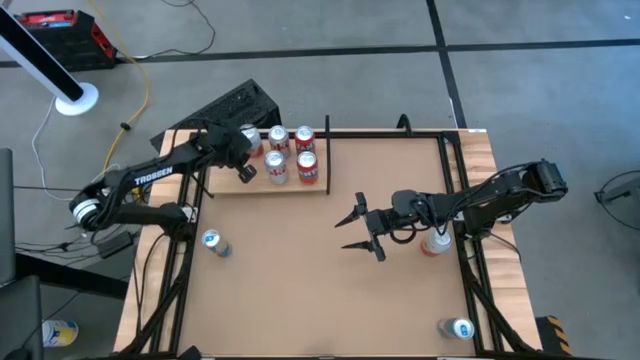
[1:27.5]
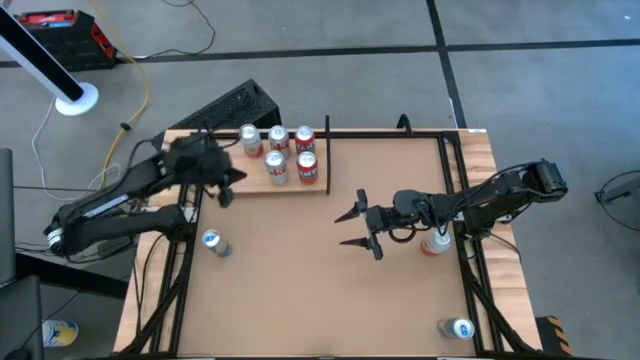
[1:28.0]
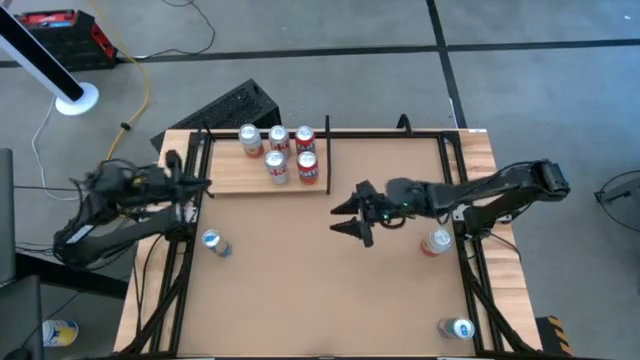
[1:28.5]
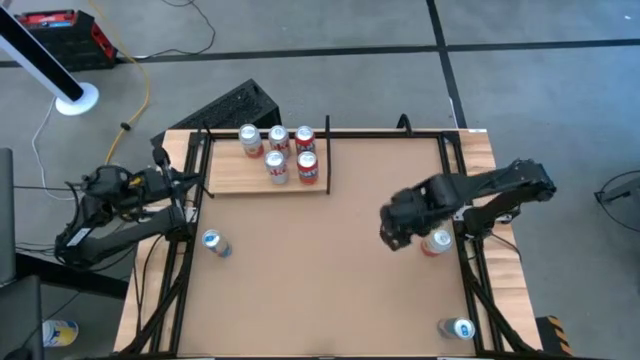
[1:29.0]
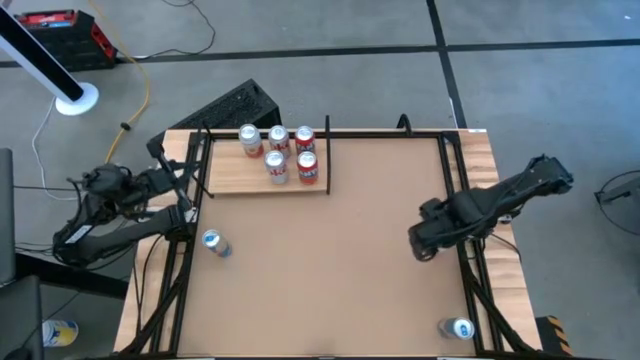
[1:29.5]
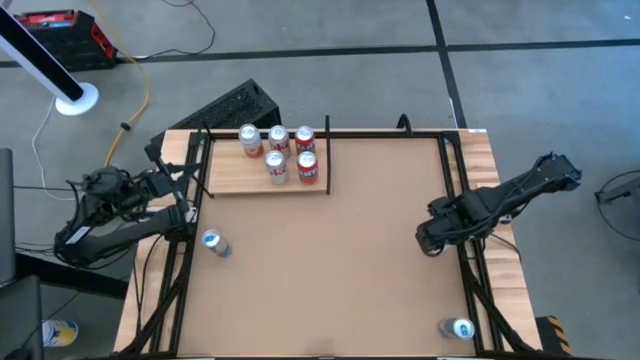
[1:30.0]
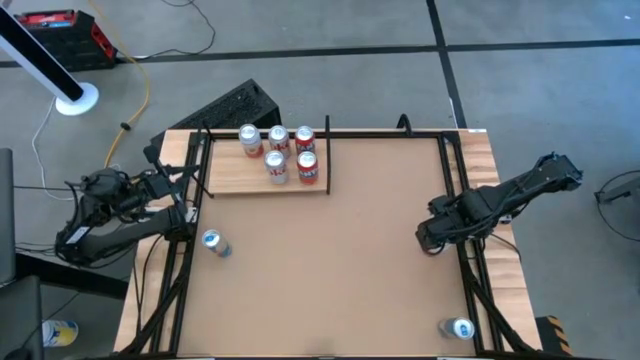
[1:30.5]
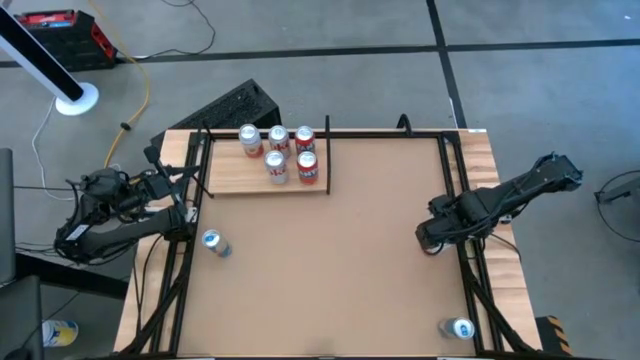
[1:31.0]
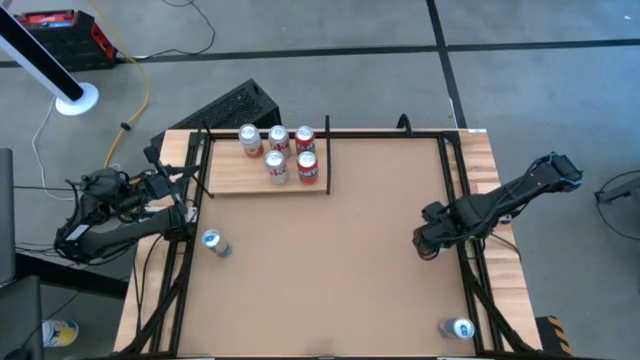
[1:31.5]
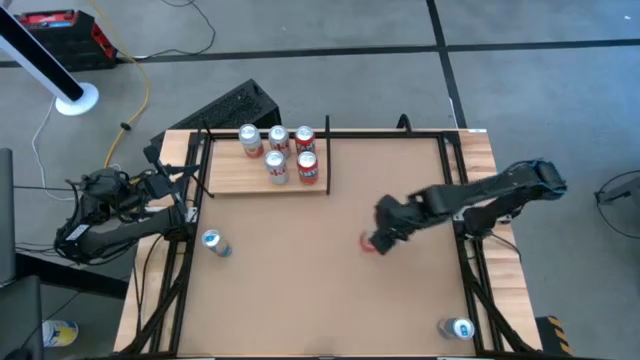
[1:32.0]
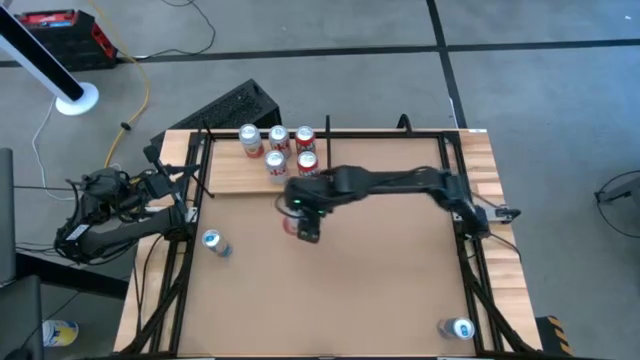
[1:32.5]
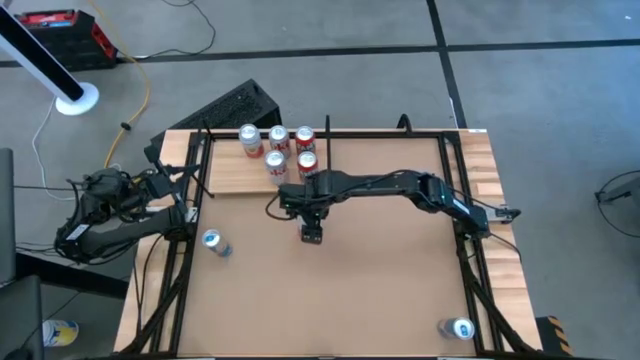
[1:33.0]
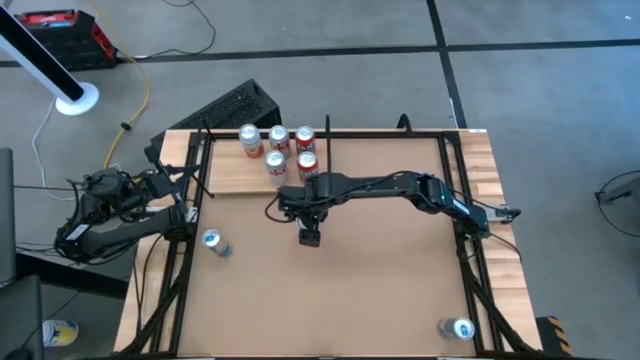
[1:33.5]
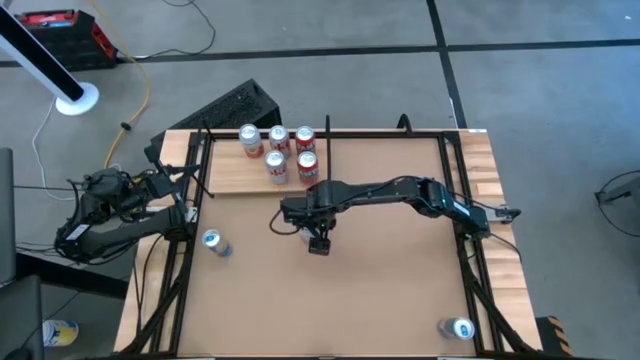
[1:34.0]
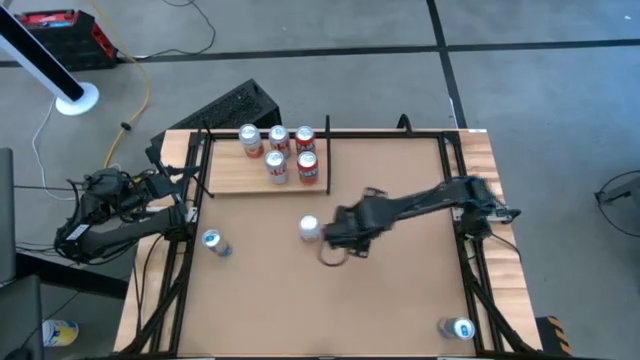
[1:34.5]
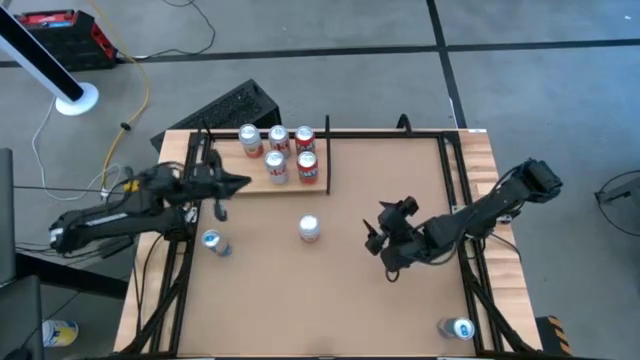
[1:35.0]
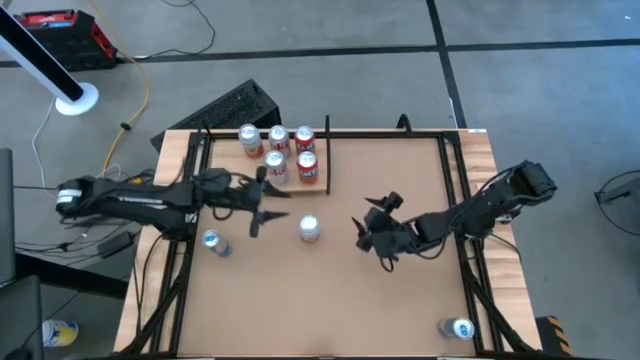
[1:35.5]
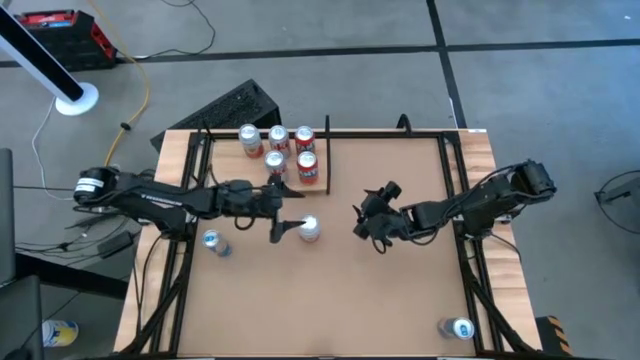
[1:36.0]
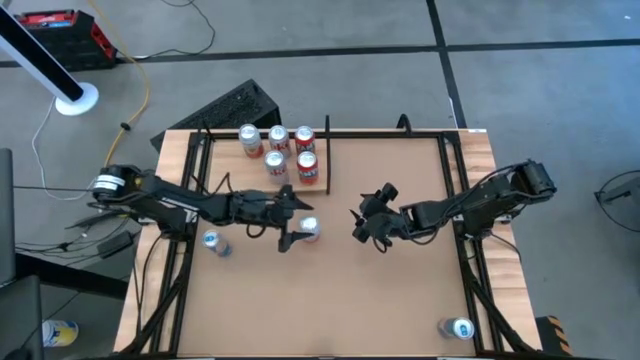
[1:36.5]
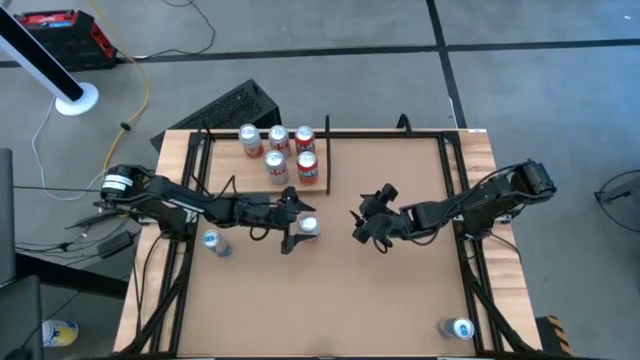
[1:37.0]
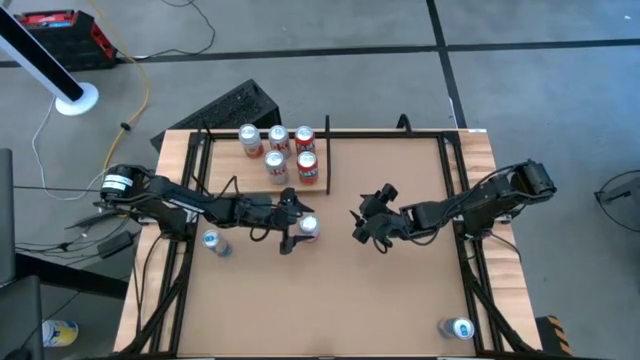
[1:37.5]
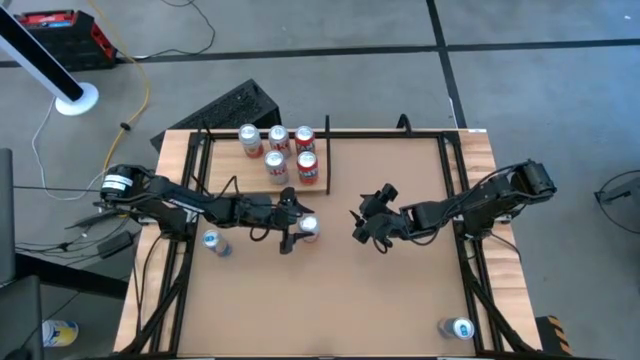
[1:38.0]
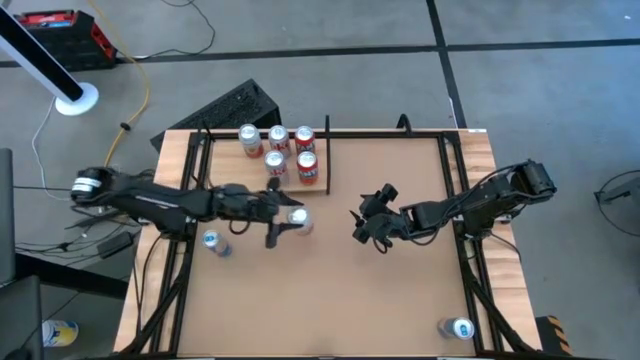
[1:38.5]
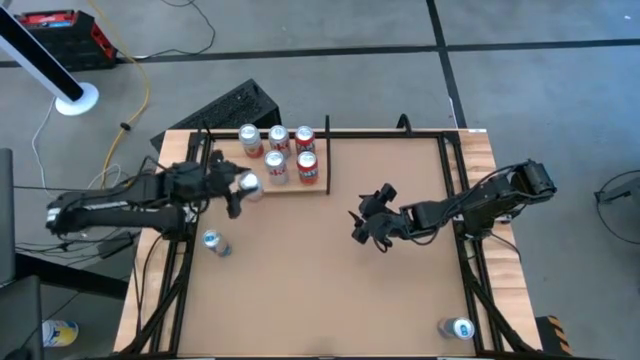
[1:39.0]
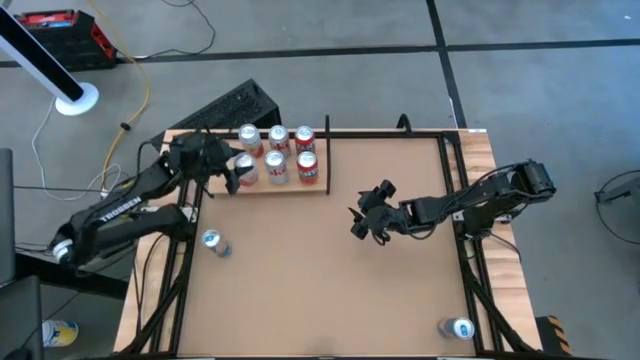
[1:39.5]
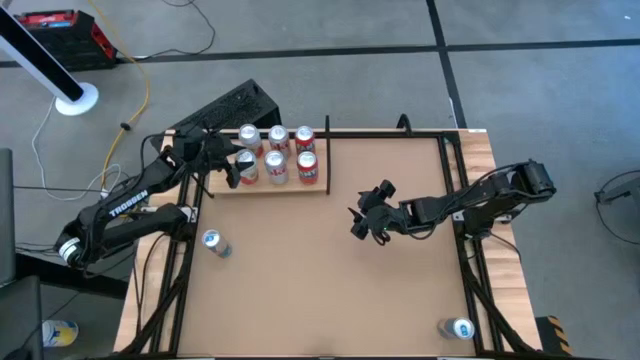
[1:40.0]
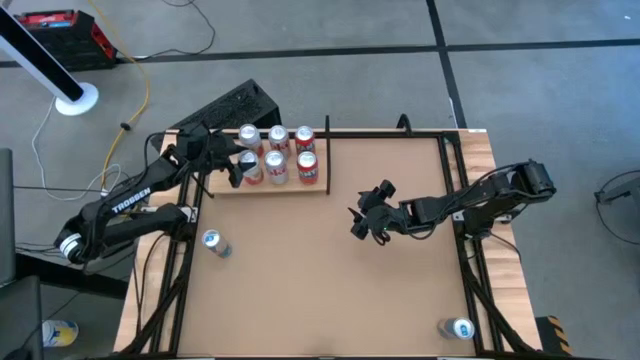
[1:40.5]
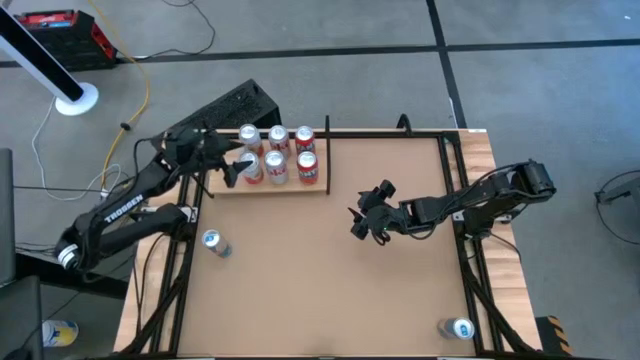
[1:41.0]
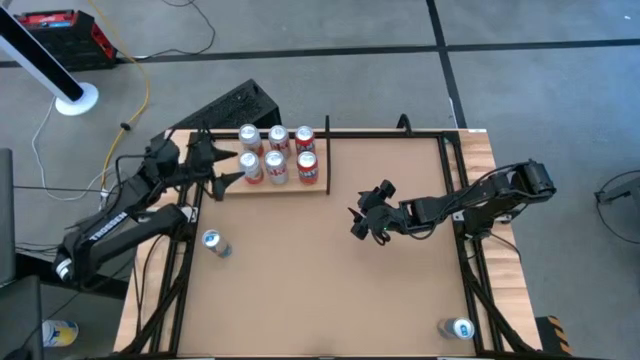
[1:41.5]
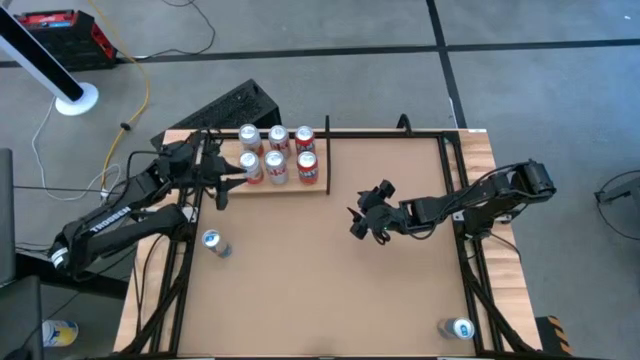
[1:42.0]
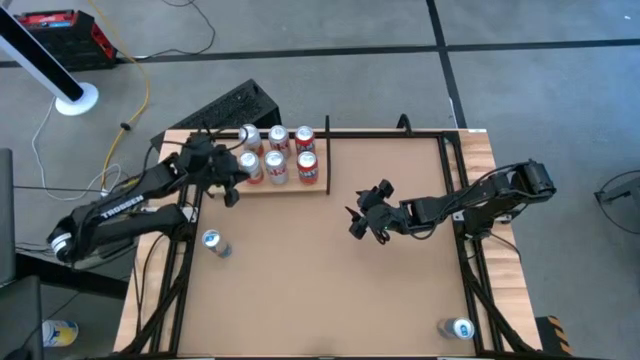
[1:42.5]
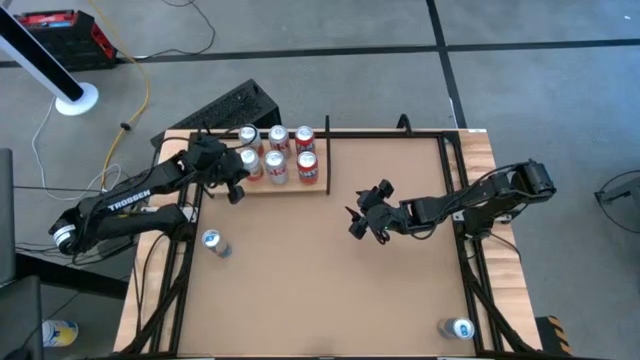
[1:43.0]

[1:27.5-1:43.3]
Task: Place canned beverage on shelf
Put the white-pink soda can on the shelf aligned with the other white-pink soda can

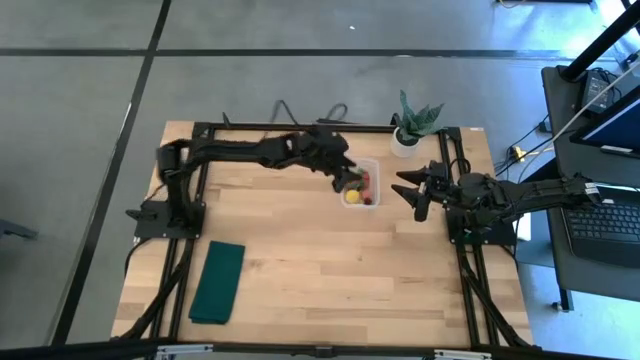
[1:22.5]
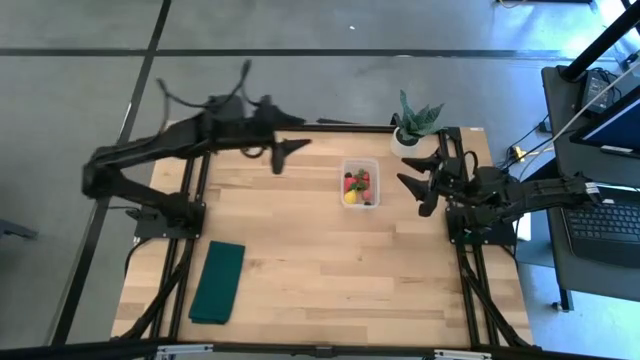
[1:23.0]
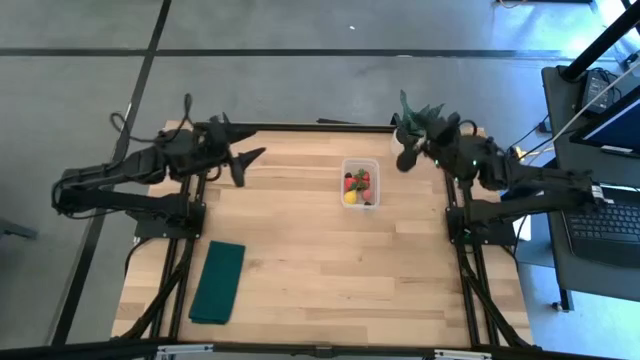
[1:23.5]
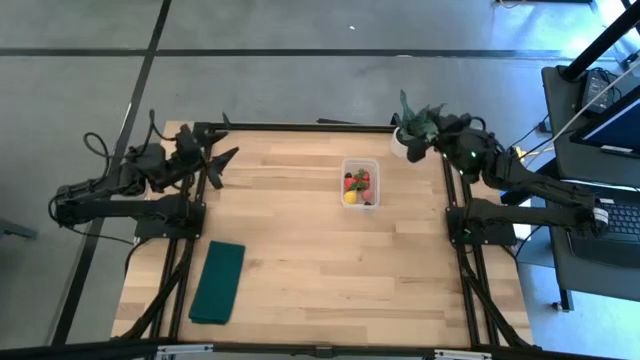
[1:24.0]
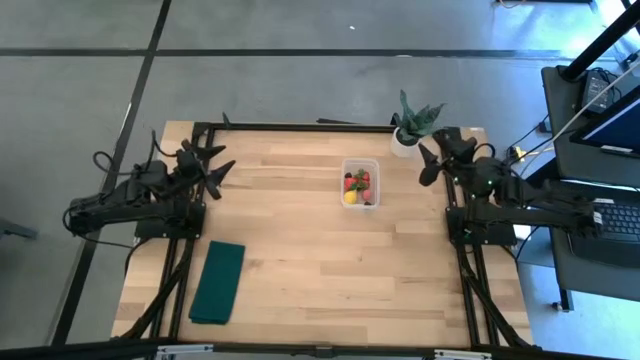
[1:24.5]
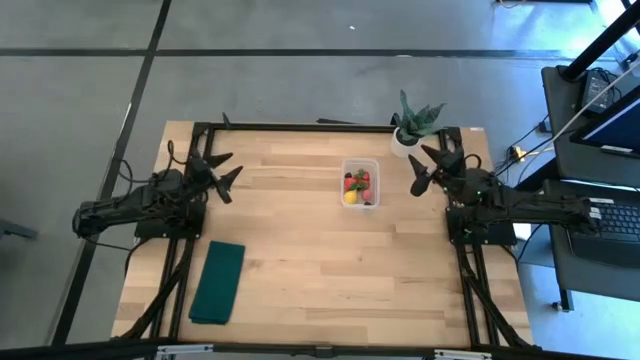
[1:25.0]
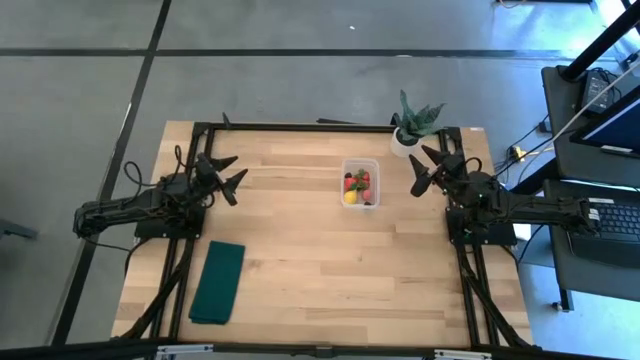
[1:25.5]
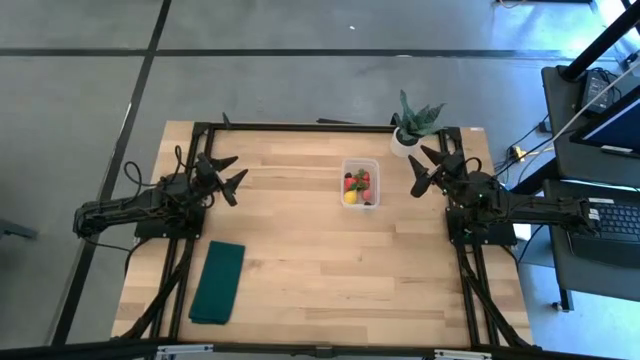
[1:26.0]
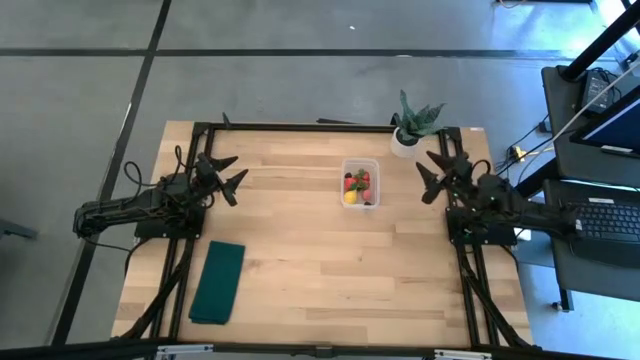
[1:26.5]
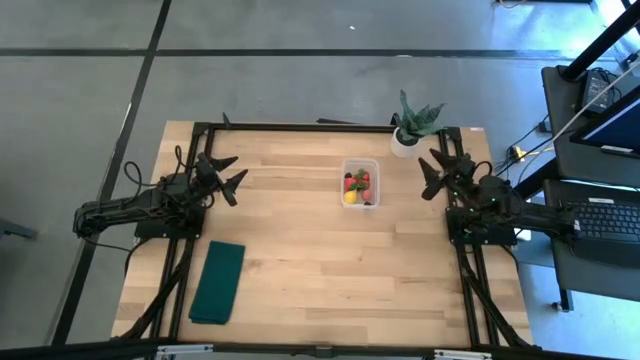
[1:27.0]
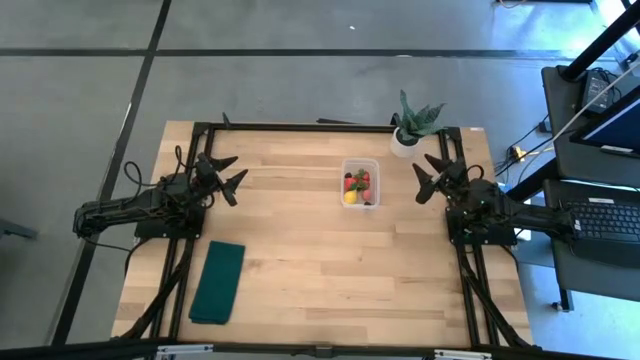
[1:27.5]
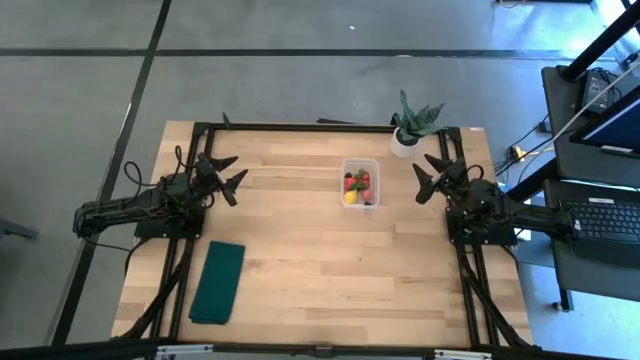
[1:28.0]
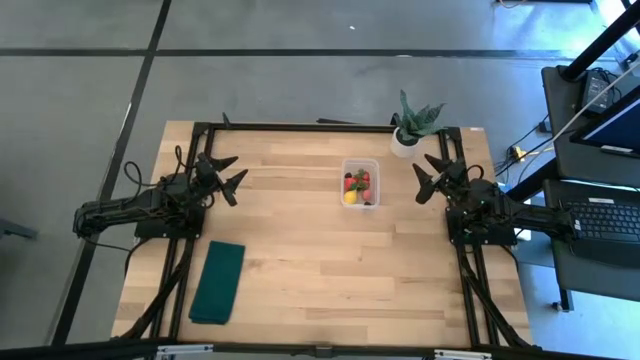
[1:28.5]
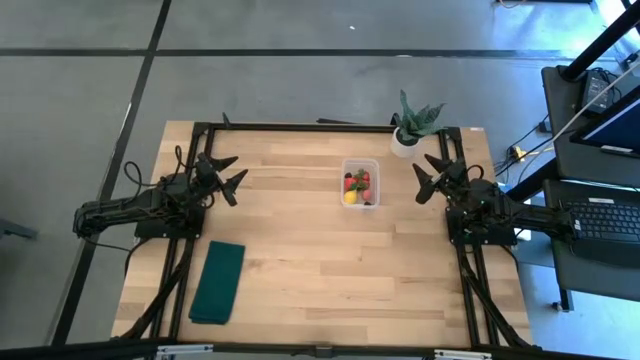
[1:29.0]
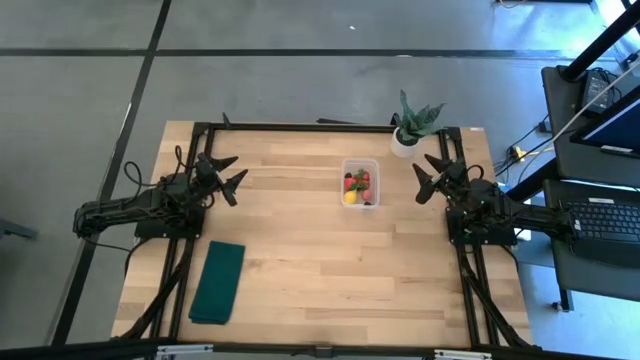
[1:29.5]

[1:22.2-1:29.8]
Task: Pick and placing Produce into tupperware
Return to Home Position
